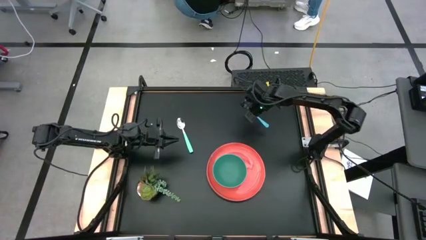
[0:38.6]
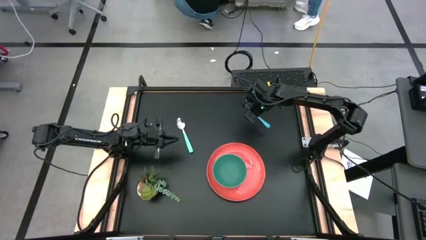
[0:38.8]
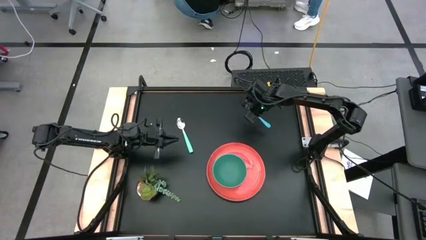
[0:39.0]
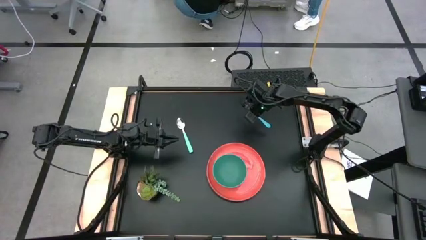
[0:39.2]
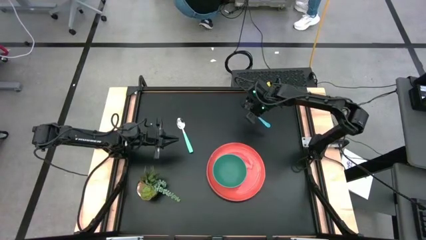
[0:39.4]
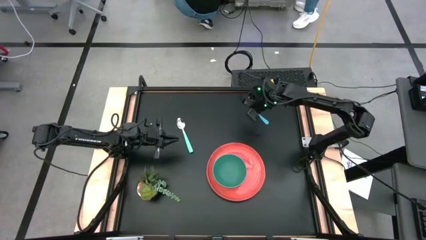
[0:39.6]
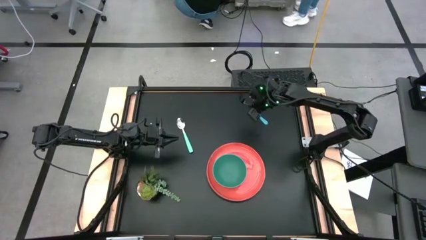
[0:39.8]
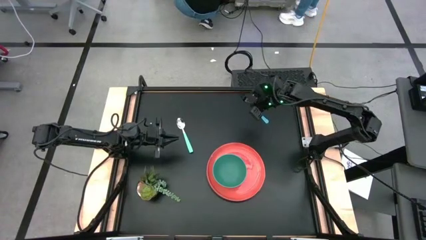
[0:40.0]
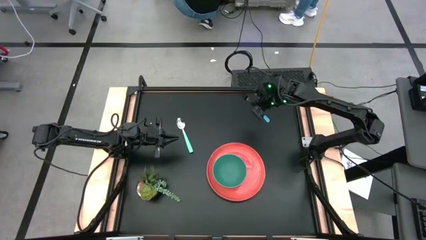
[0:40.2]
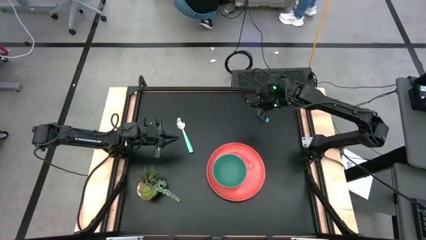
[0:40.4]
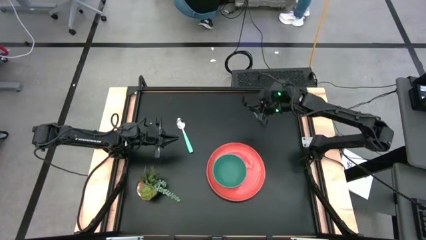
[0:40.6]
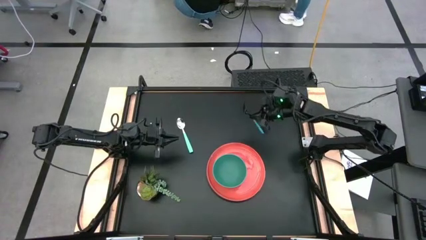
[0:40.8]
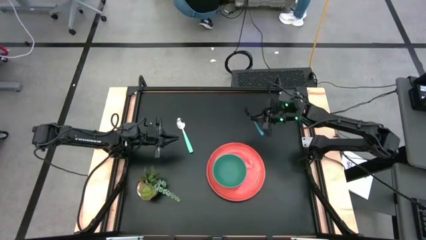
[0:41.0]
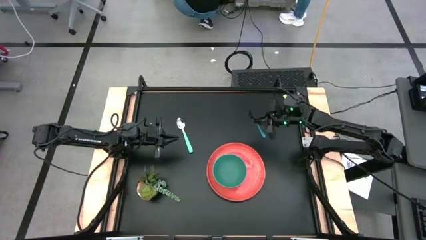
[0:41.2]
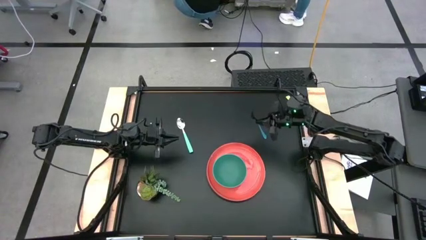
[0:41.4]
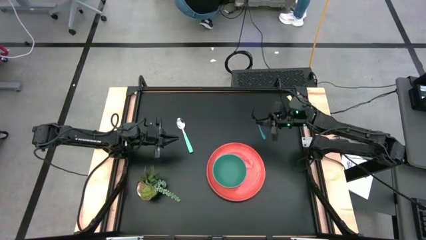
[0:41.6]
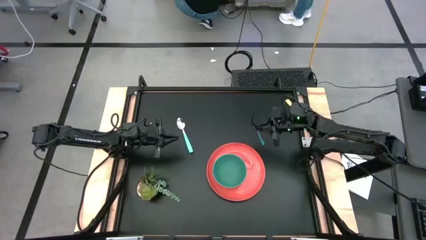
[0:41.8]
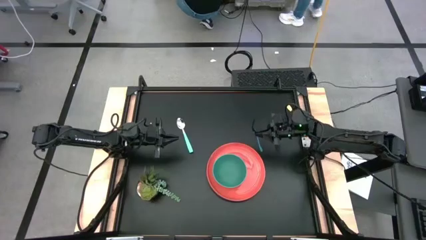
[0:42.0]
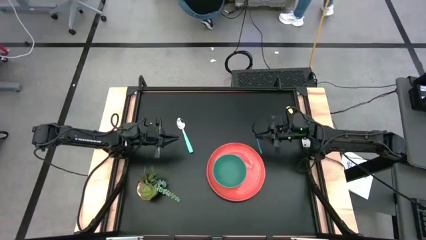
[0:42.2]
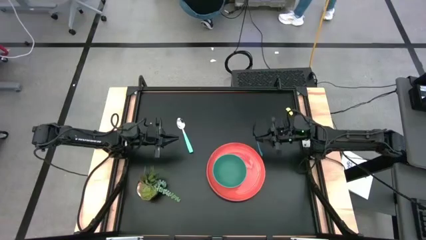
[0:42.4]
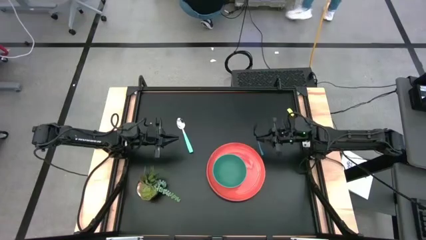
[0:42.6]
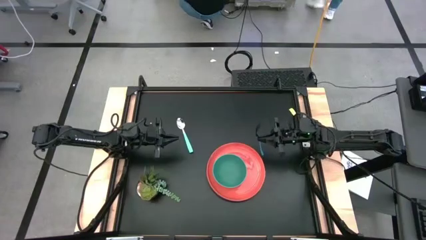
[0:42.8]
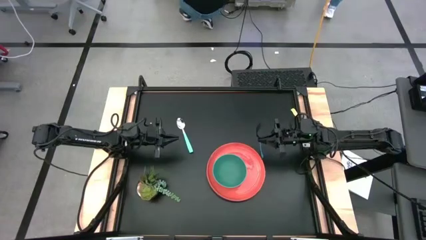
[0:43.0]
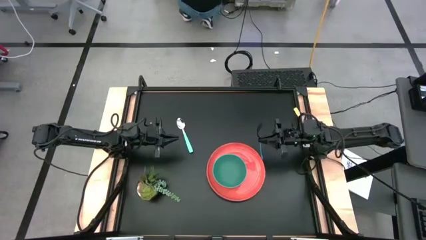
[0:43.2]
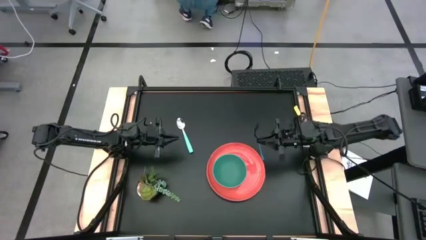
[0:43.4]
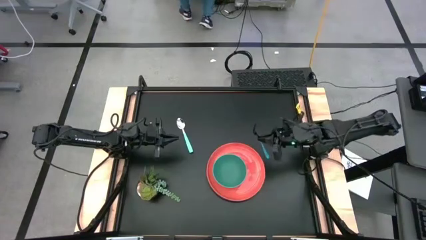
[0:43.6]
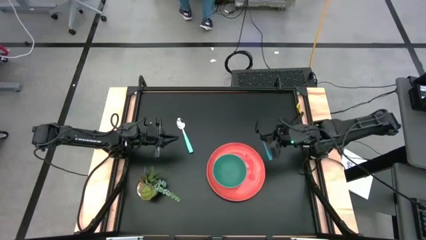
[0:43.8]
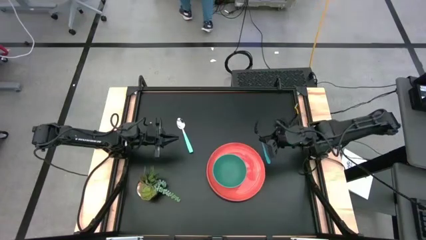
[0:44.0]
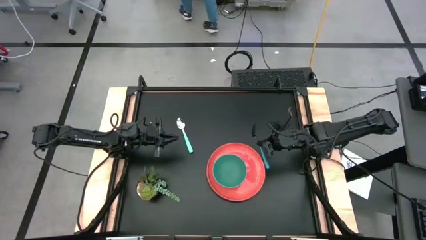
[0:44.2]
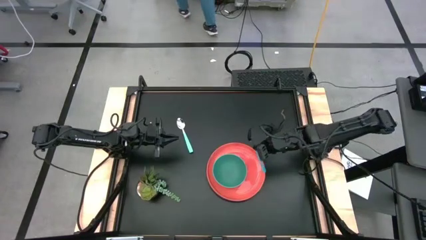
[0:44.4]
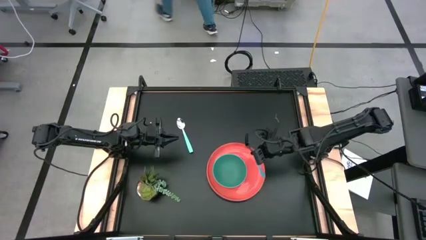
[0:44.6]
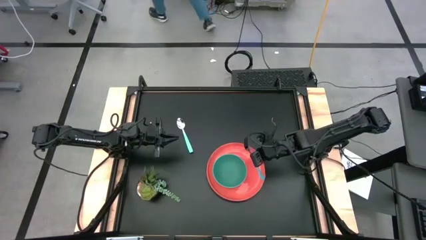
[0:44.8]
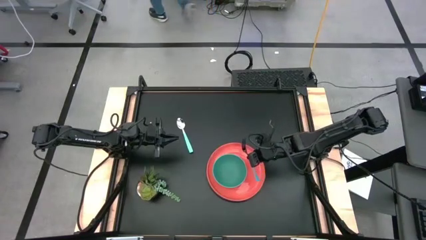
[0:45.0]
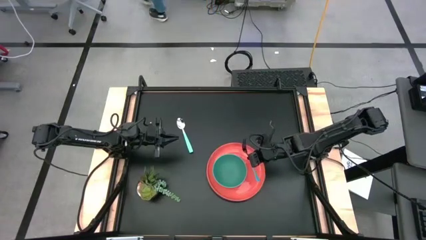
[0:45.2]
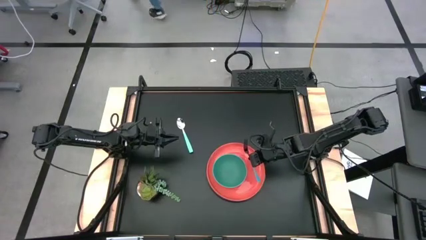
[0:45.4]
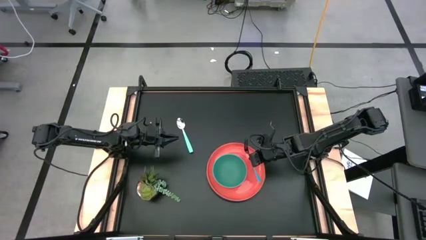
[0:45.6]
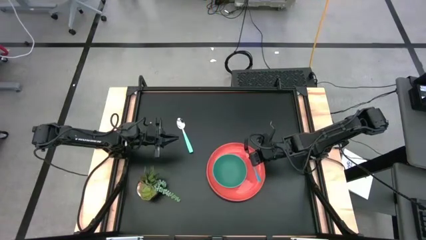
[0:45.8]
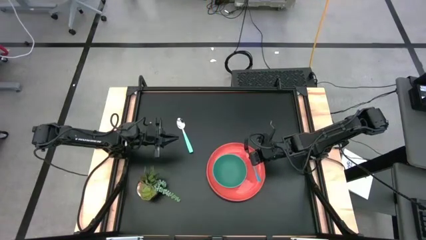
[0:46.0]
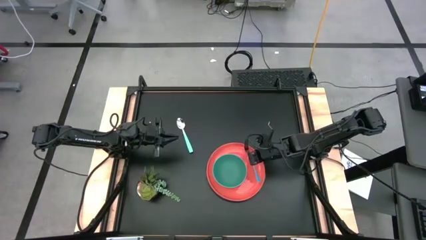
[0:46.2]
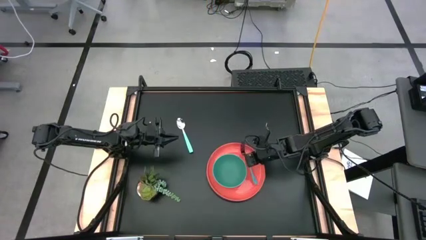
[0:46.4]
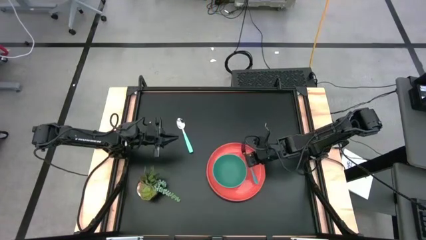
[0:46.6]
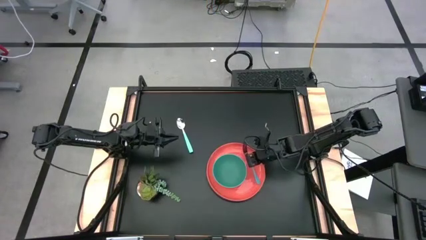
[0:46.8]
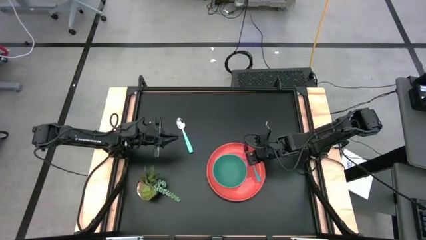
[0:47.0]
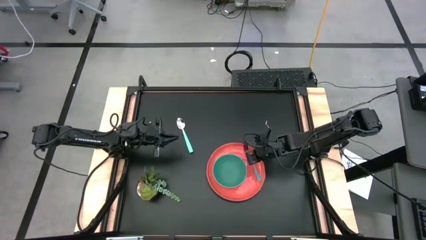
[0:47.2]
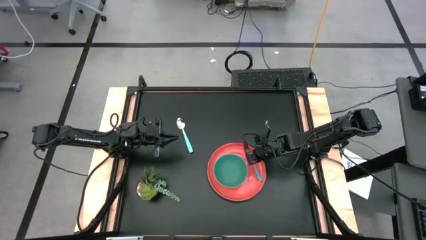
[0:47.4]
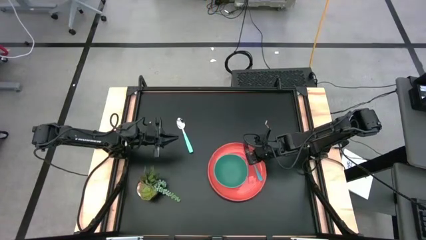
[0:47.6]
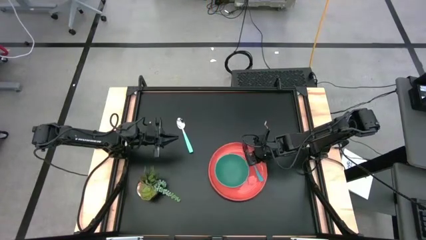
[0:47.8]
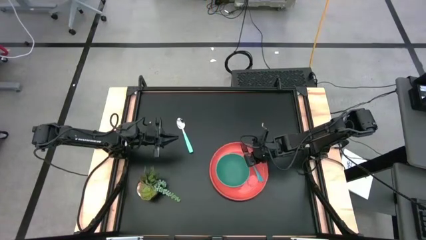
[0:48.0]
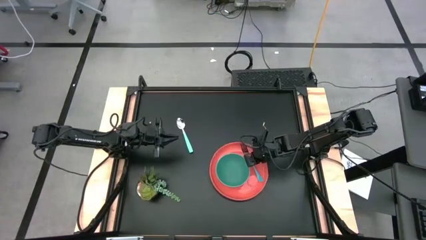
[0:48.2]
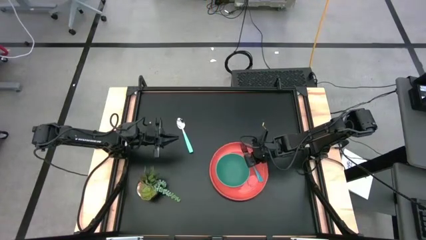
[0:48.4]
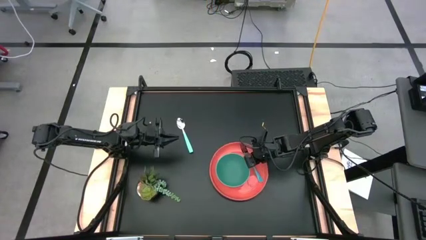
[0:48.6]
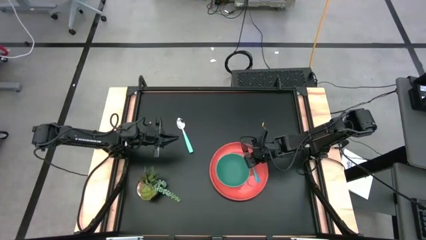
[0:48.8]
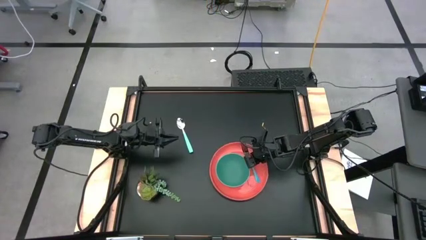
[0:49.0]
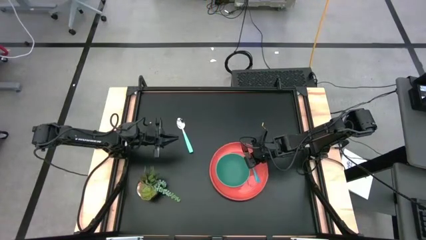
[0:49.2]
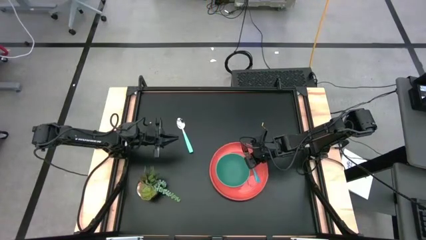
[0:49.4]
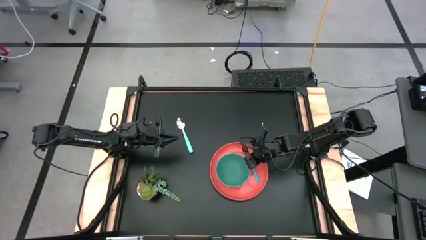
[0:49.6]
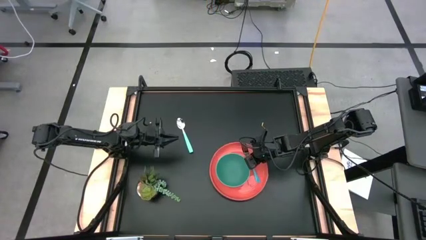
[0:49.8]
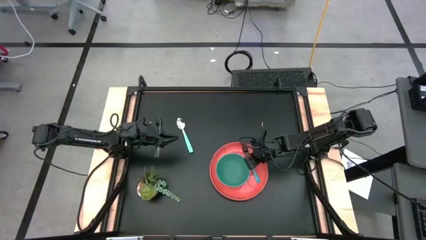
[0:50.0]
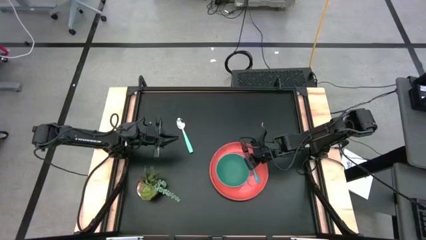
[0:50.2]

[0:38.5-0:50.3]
Task: Pick and place plate/cup/fork/spoon on tray
Put the fork on the orange plate beside the green bowl

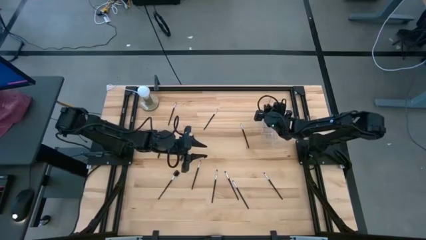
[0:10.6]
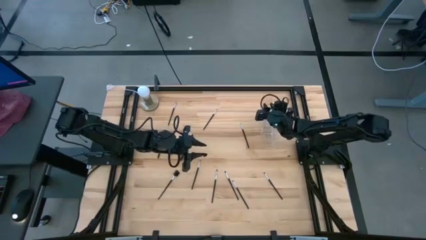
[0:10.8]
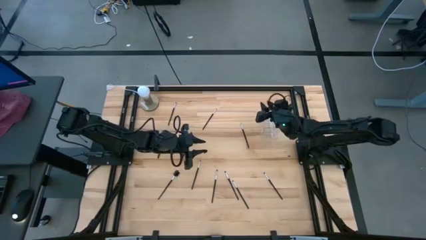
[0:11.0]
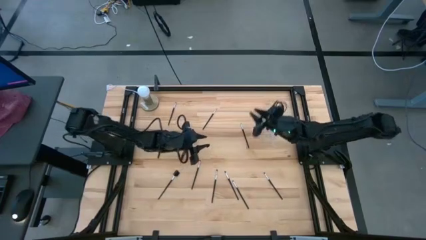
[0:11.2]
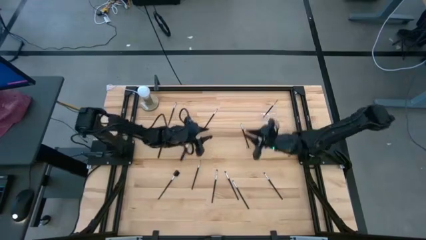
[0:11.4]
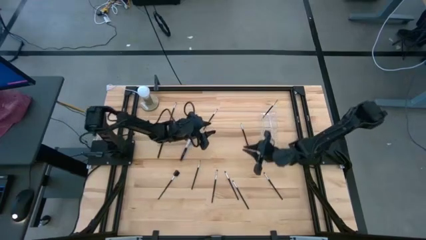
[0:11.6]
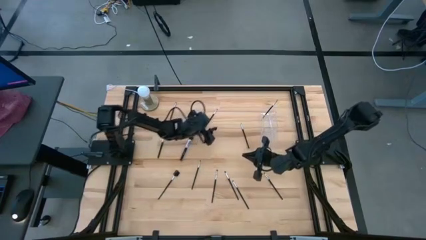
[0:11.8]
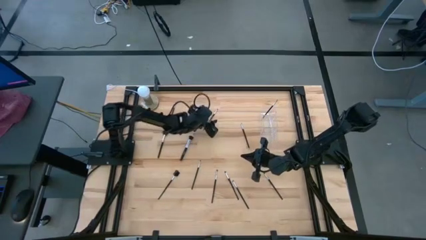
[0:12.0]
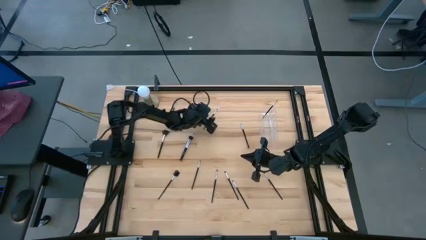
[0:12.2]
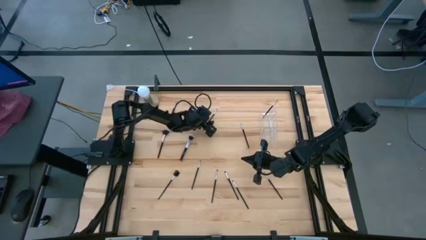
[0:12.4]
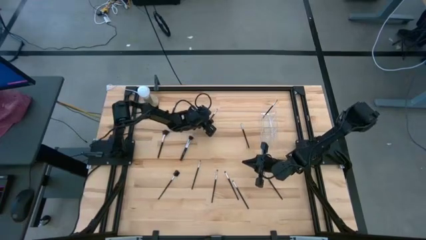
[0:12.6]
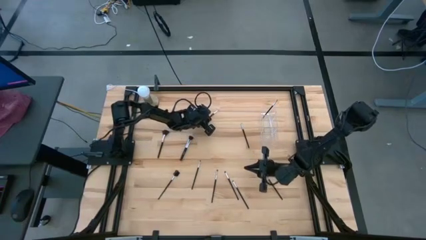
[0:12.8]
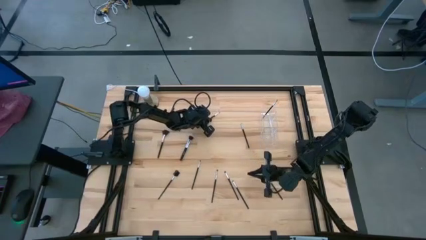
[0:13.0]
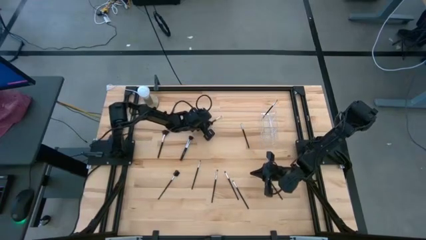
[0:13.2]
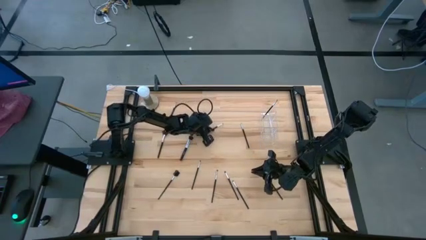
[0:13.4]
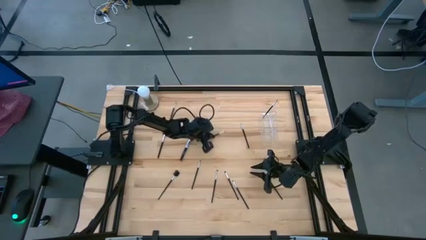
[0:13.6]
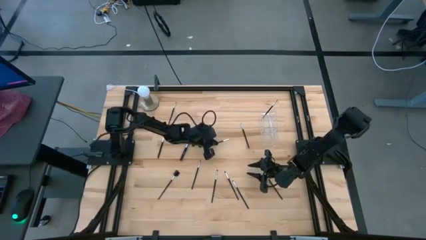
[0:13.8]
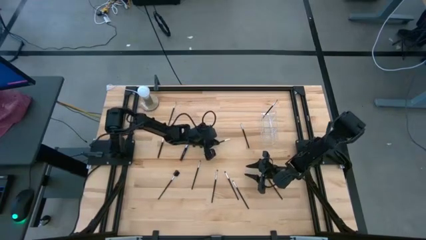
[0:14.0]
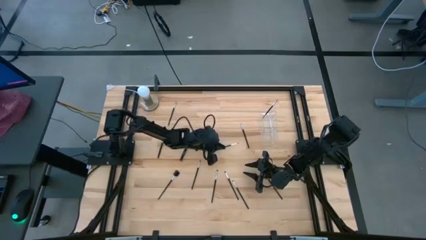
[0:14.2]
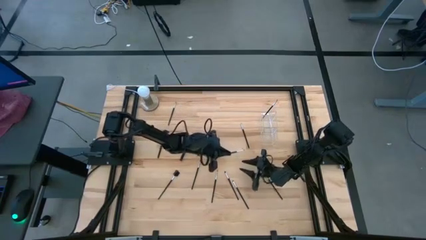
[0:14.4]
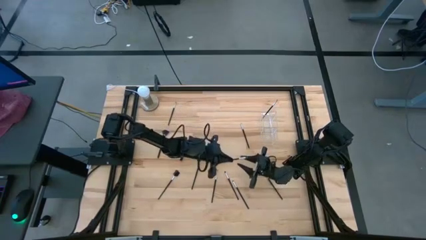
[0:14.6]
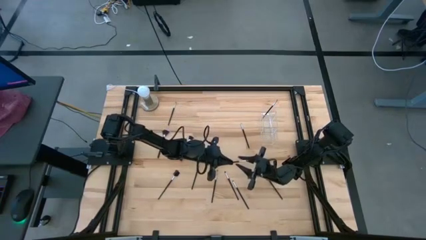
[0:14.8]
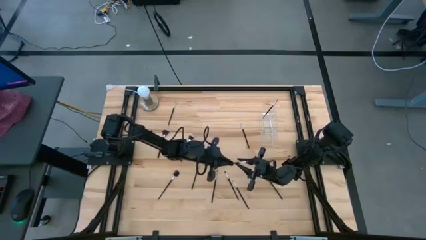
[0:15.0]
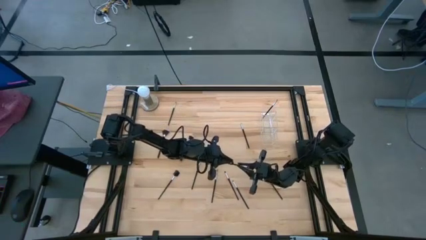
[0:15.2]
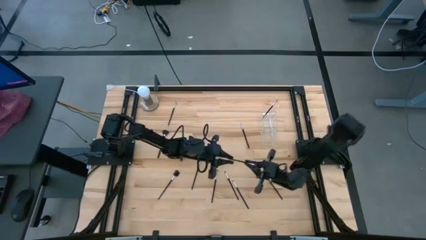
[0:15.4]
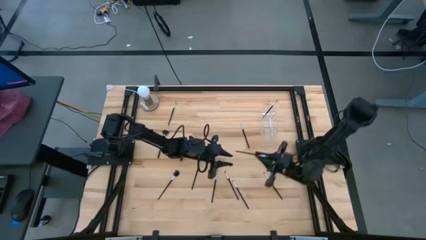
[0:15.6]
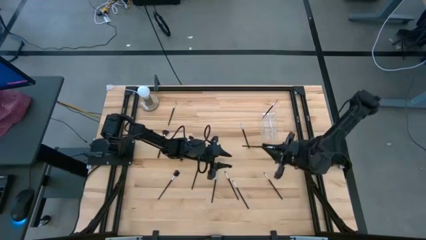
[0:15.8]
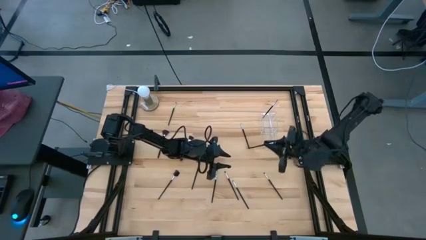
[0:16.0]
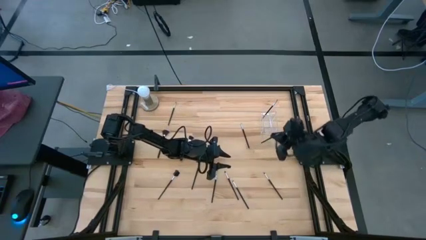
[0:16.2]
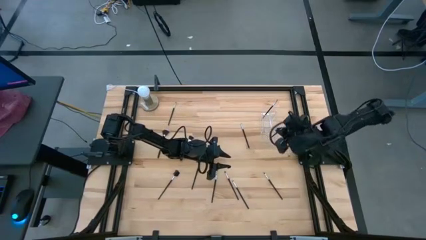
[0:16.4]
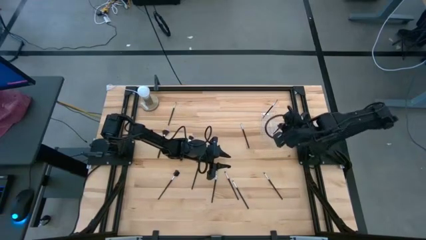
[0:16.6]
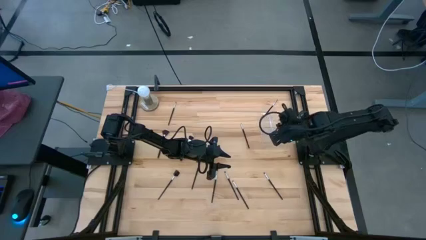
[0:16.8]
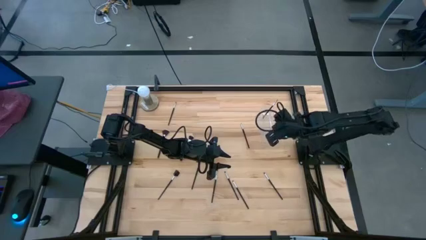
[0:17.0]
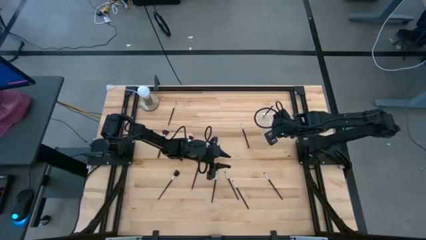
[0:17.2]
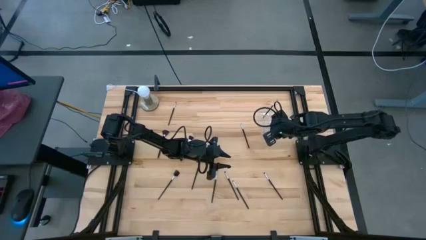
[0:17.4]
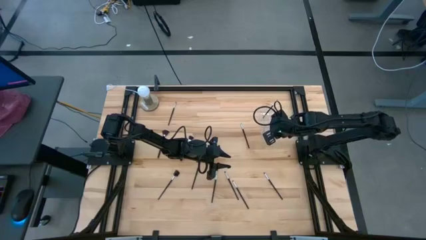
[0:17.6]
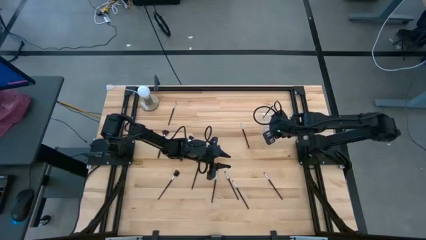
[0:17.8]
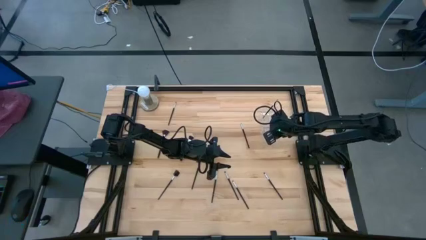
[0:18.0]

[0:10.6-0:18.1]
Task: Sort items
Put the silver eyeshadow brush into the transparent organizer
